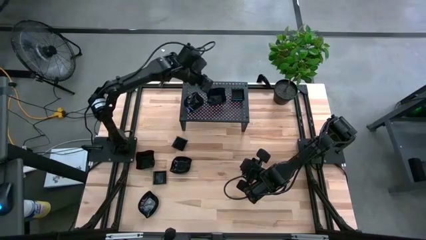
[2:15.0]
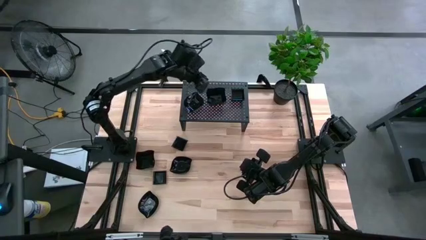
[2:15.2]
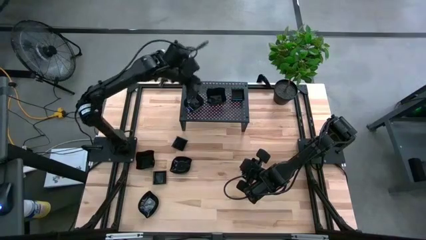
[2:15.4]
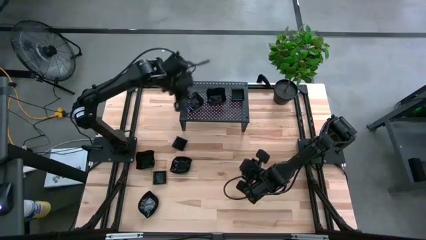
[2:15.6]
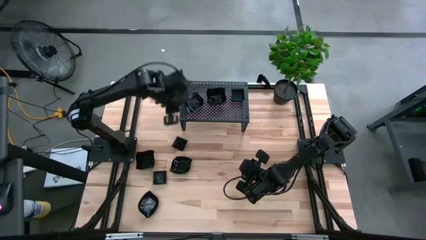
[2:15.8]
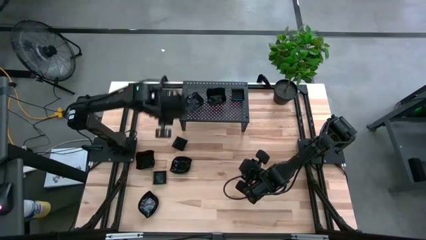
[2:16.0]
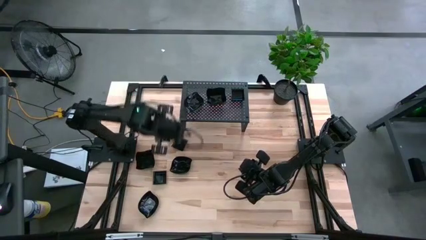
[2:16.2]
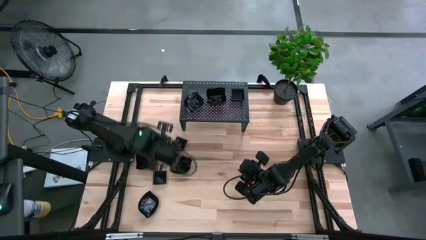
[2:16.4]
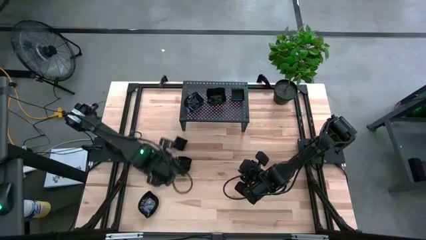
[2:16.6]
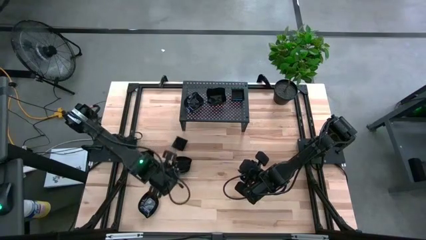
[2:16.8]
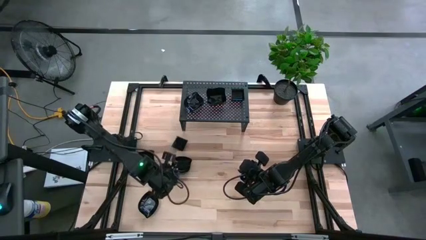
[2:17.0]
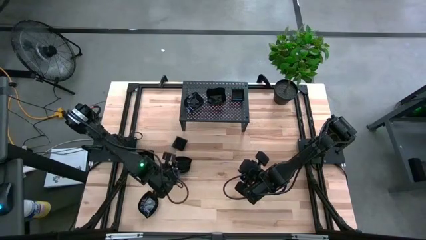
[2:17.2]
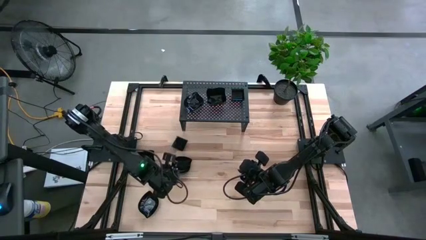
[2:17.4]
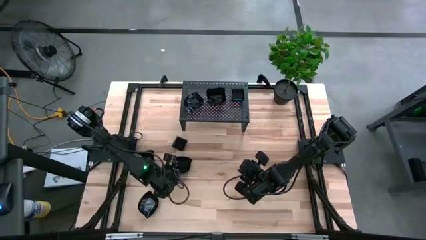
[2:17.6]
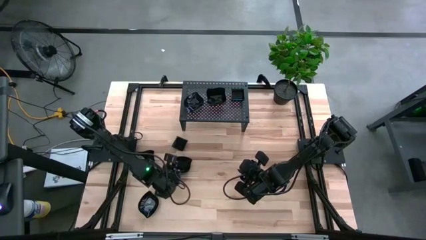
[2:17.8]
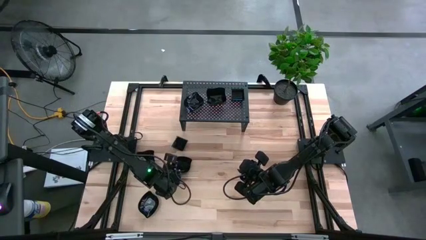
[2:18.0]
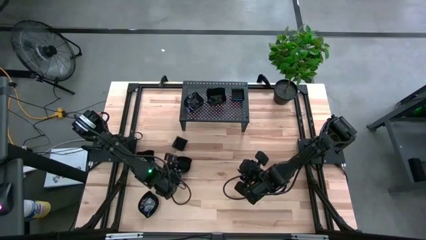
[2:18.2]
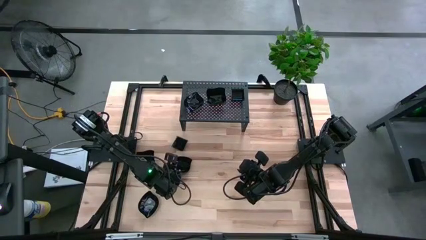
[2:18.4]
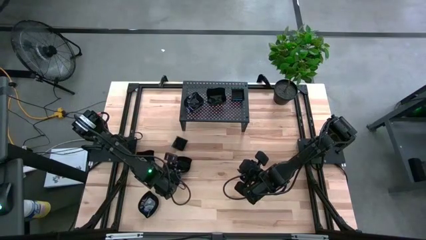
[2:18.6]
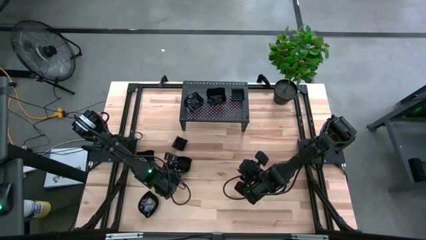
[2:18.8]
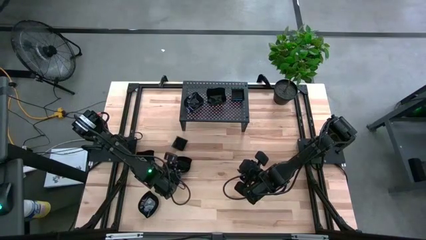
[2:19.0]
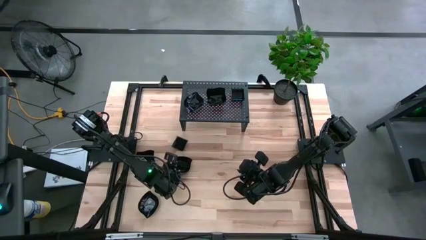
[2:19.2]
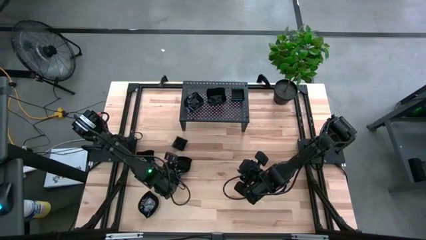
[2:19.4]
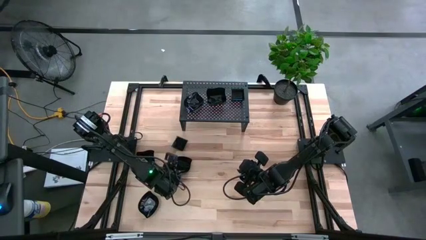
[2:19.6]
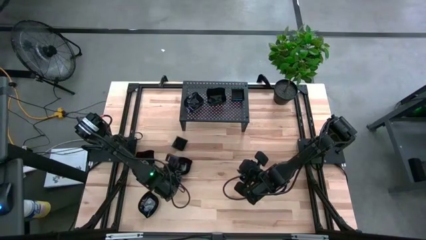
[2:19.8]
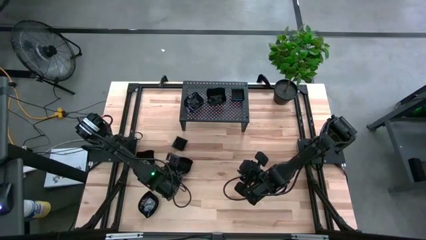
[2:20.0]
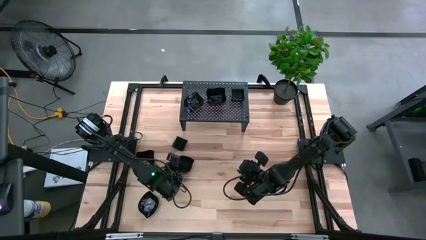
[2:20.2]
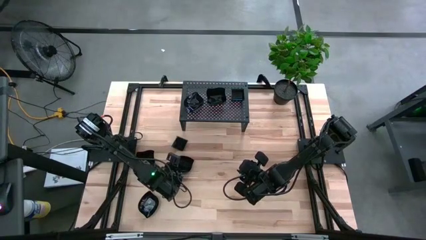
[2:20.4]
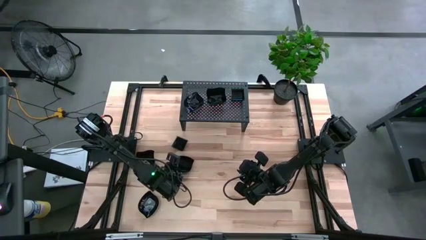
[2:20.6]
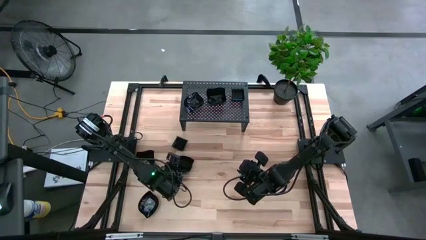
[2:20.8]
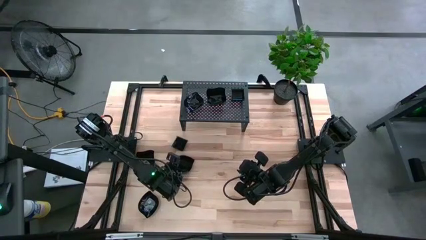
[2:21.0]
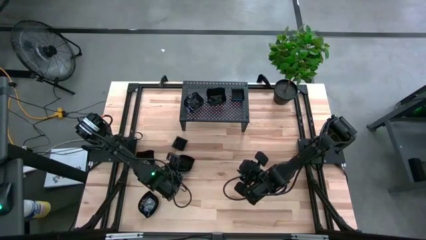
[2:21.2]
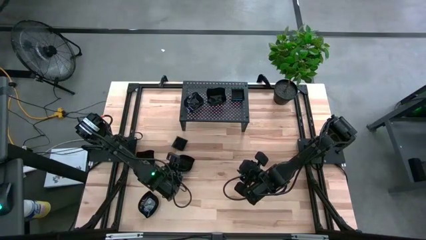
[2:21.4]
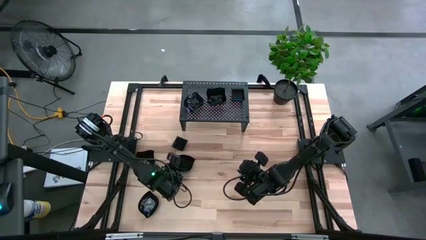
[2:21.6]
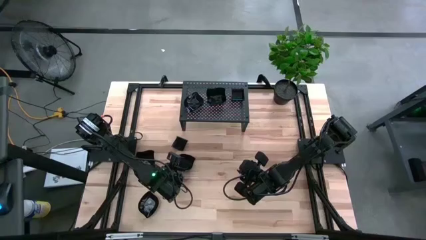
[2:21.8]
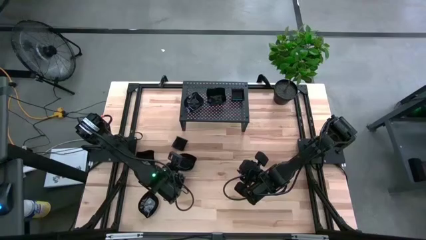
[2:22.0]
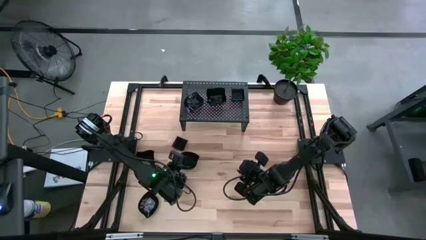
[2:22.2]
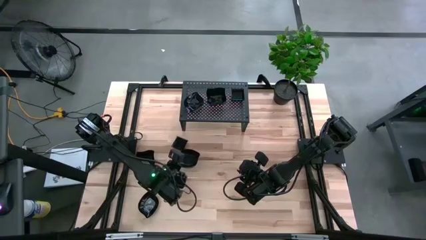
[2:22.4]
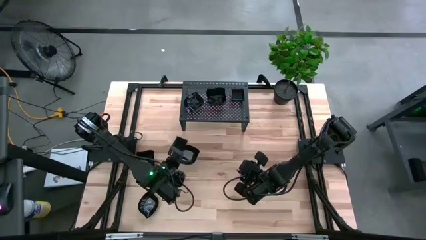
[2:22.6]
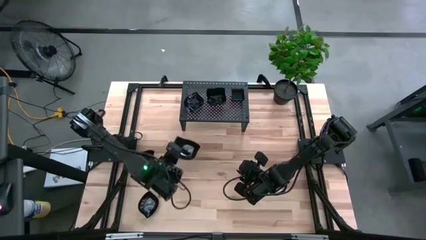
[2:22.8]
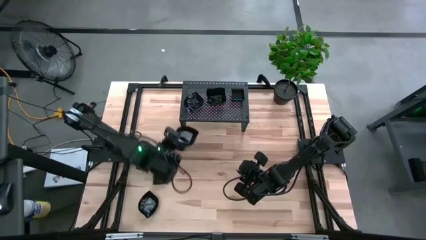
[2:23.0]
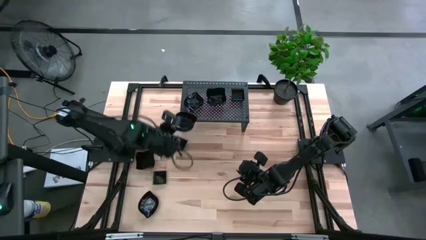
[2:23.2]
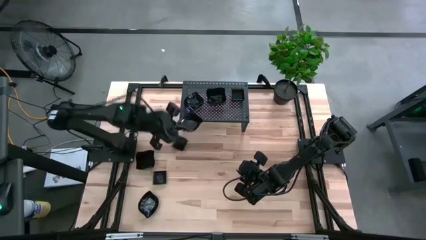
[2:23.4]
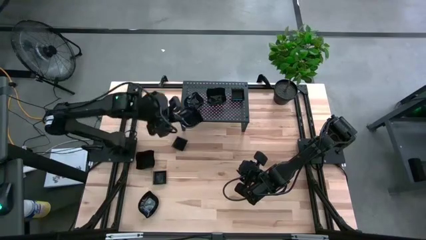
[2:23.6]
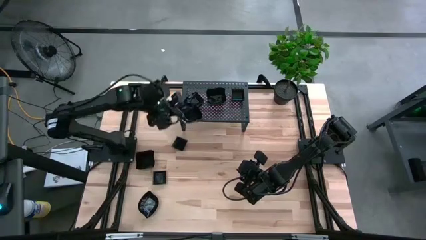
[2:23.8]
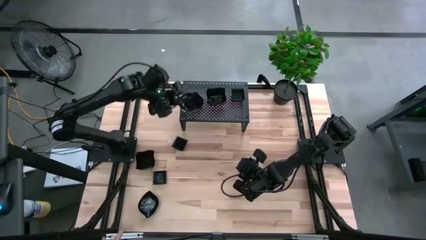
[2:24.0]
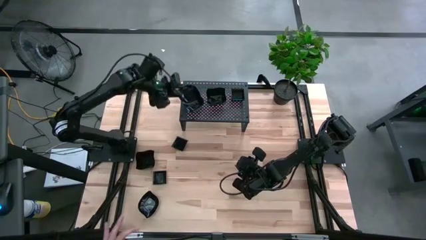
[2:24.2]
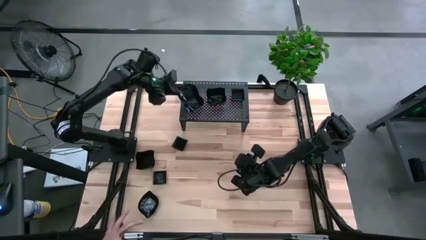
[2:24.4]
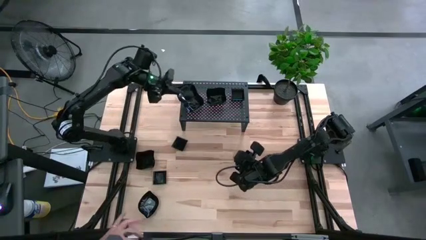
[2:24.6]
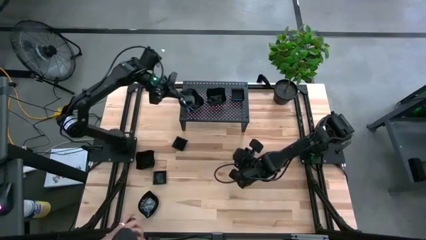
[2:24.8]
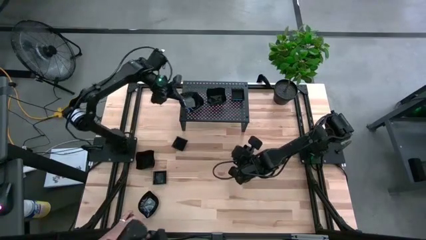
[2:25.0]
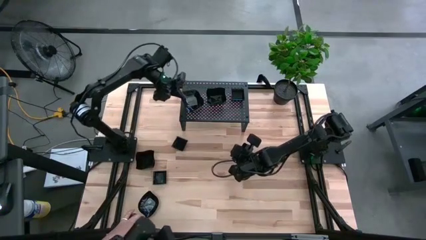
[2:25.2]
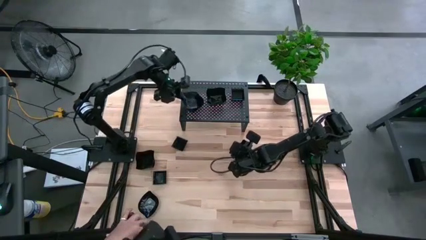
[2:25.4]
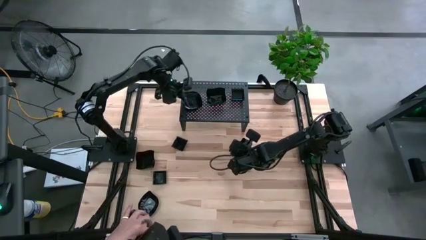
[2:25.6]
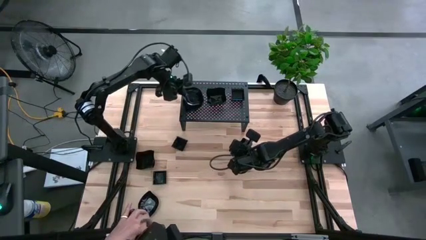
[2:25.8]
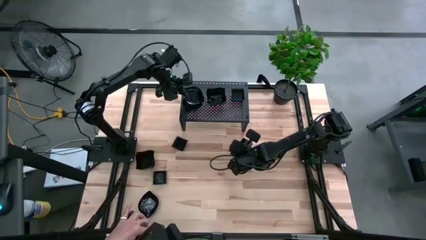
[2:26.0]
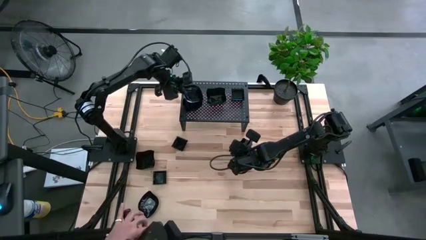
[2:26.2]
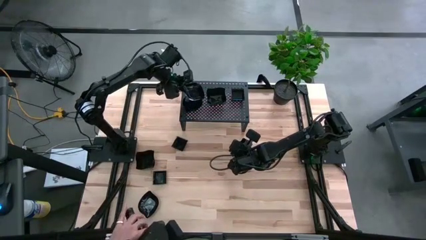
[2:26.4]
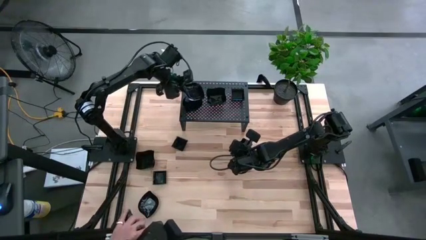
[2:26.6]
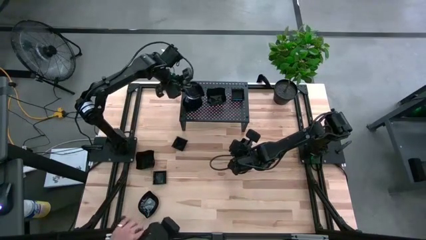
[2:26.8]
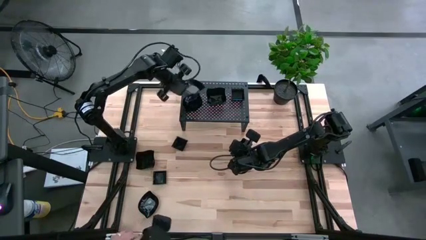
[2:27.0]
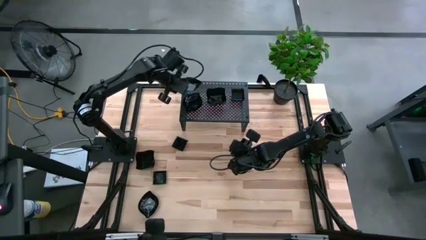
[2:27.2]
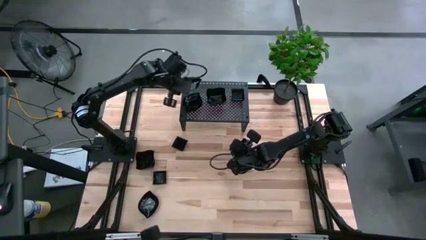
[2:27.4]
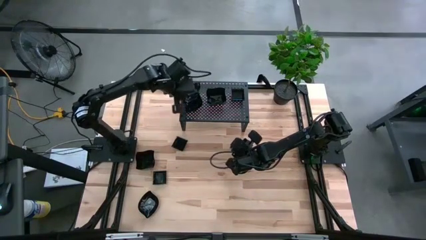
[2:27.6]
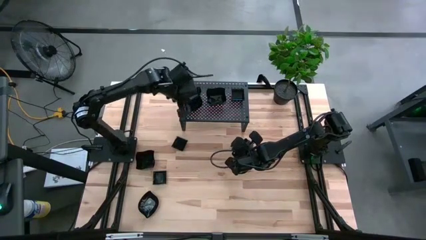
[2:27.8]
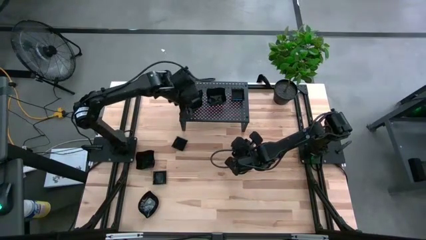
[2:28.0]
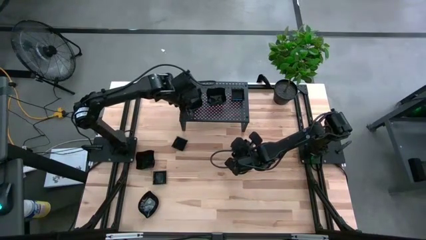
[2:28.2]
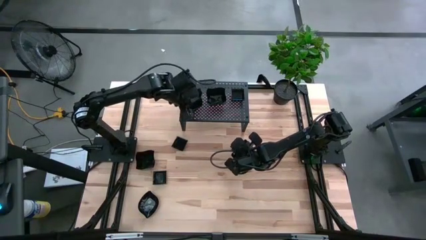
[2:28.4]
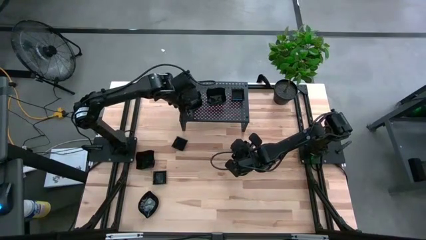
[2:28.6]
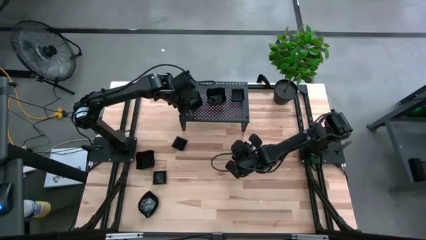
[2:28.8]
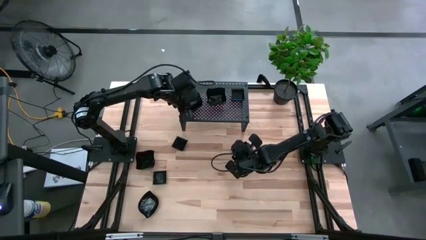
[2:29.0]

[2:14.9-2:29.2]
Task: Pick & Place Mini shaped plates
Stack the leaf shaped plate on top of the leaf shaped plate on the shelf
